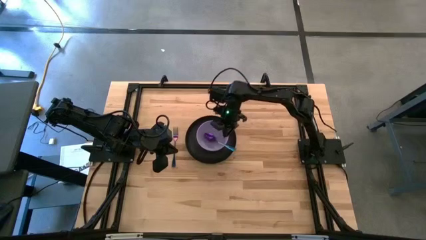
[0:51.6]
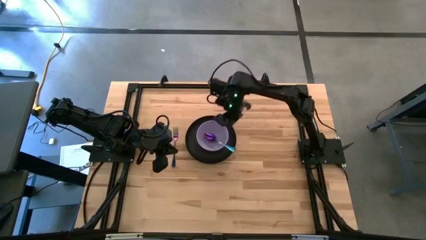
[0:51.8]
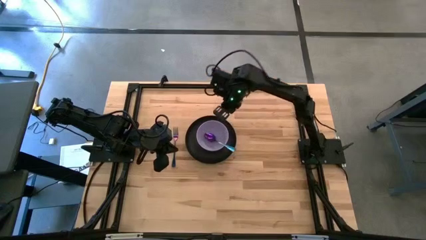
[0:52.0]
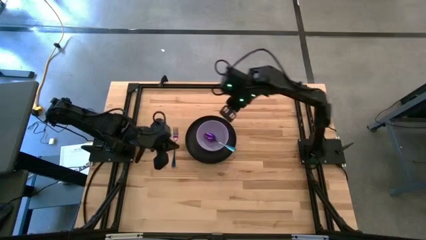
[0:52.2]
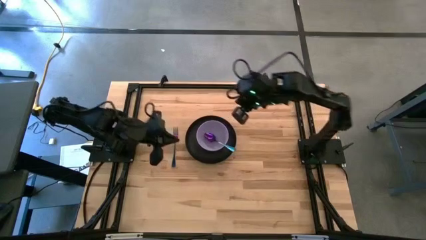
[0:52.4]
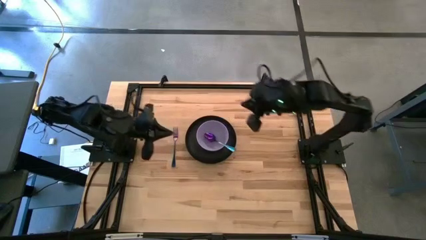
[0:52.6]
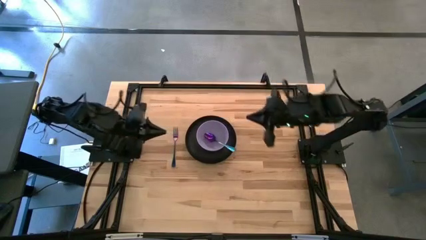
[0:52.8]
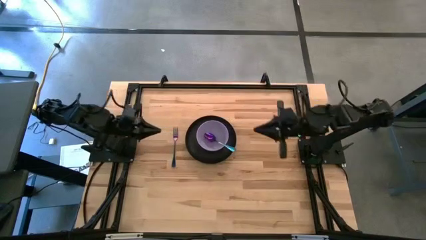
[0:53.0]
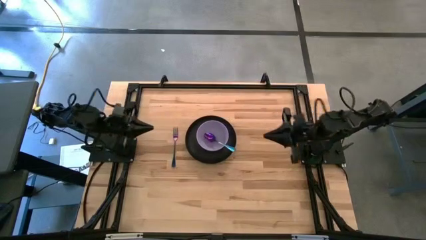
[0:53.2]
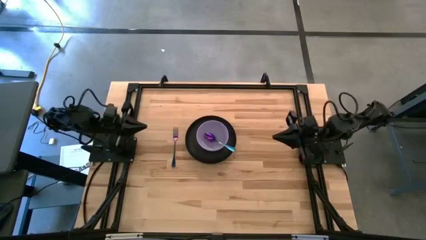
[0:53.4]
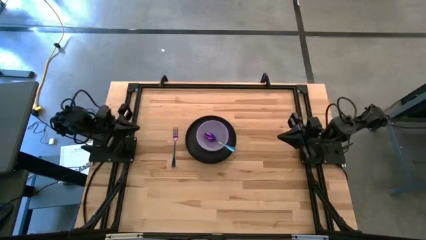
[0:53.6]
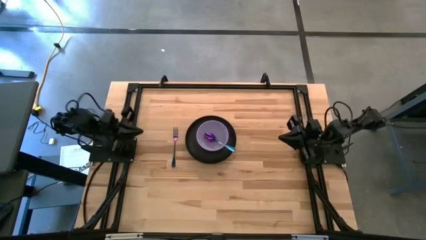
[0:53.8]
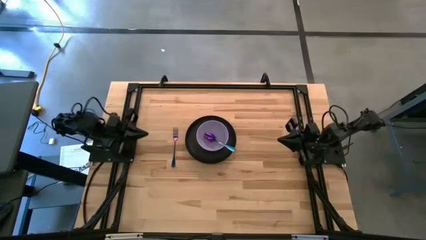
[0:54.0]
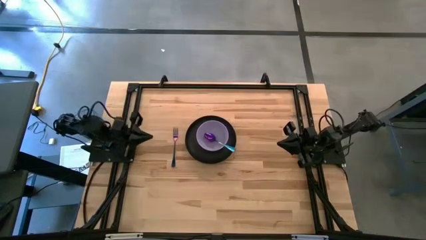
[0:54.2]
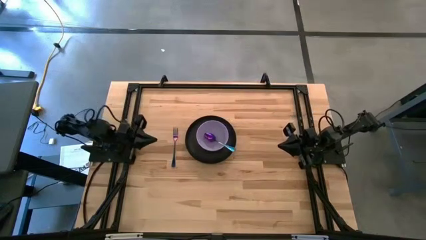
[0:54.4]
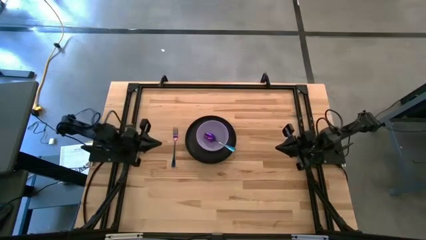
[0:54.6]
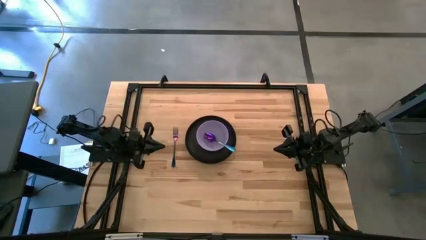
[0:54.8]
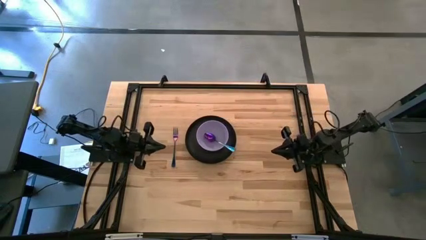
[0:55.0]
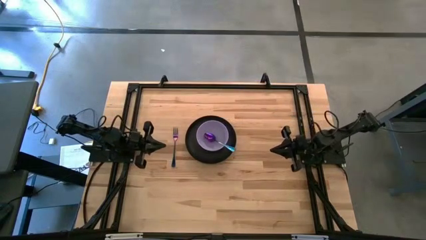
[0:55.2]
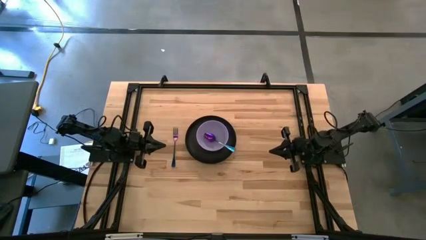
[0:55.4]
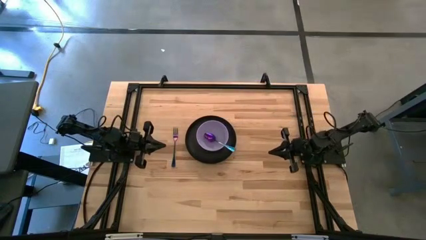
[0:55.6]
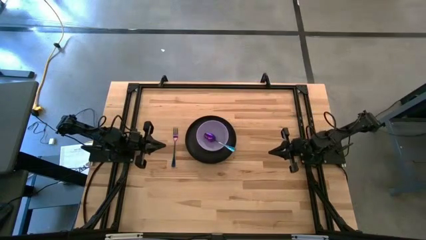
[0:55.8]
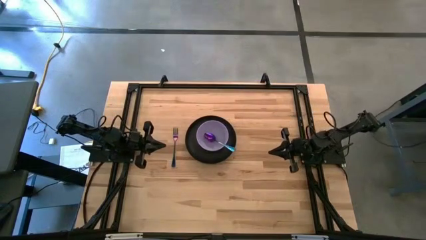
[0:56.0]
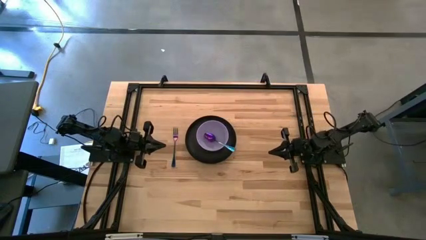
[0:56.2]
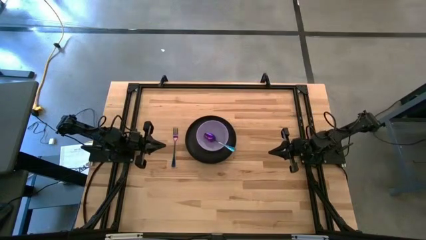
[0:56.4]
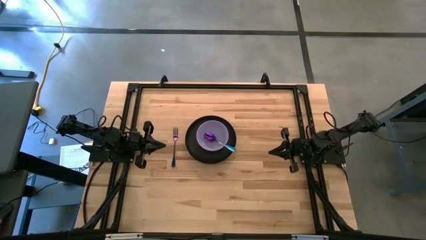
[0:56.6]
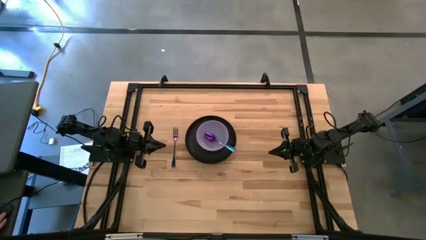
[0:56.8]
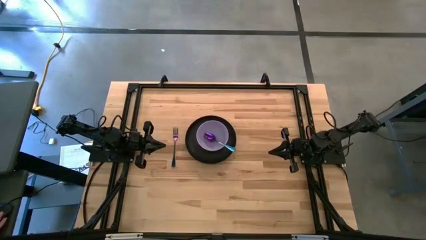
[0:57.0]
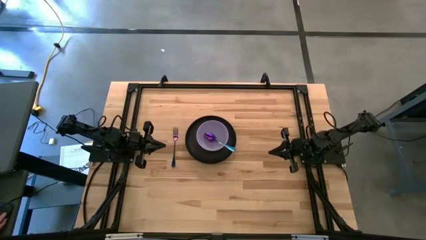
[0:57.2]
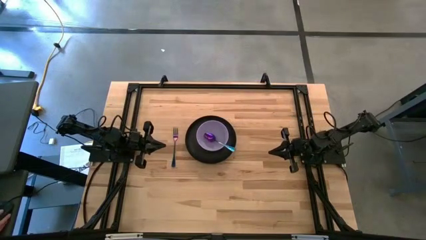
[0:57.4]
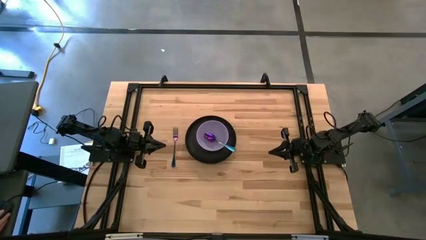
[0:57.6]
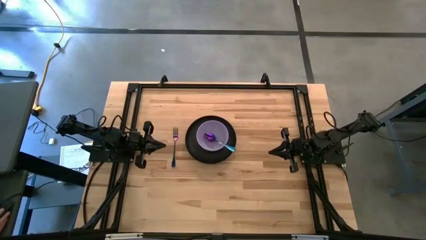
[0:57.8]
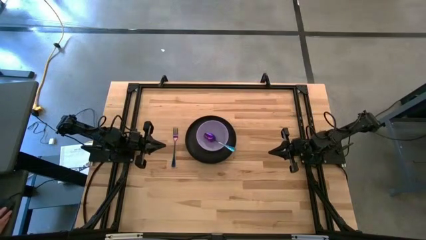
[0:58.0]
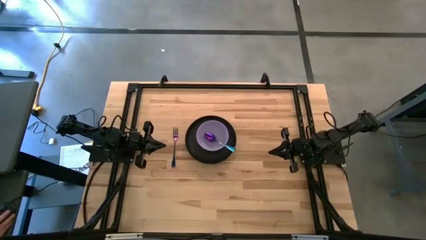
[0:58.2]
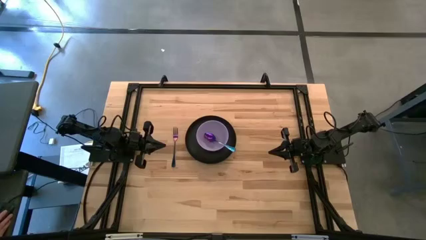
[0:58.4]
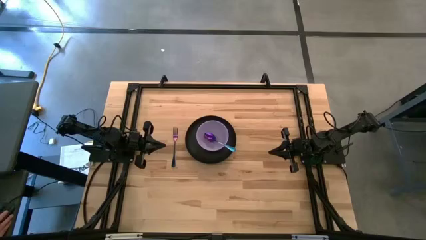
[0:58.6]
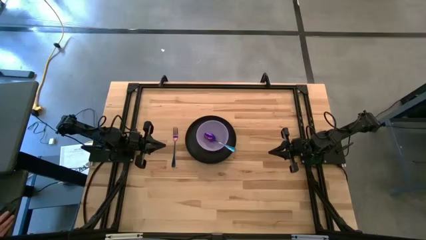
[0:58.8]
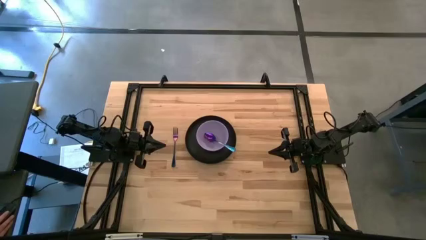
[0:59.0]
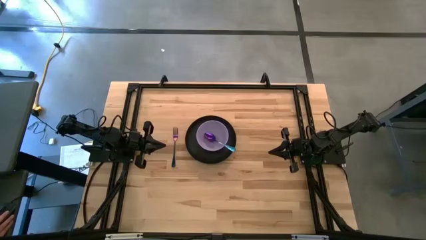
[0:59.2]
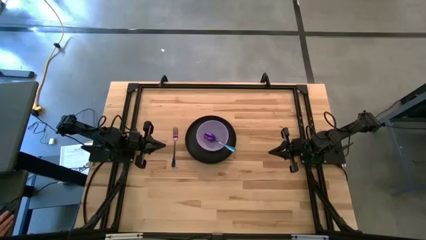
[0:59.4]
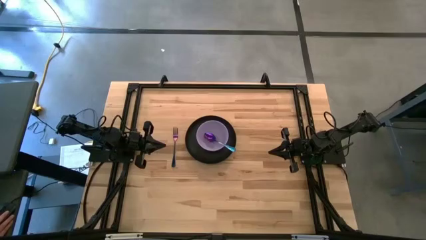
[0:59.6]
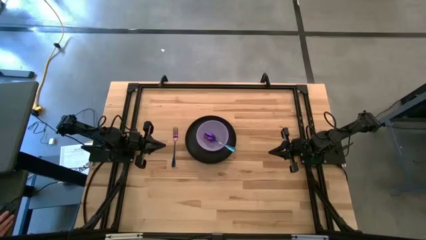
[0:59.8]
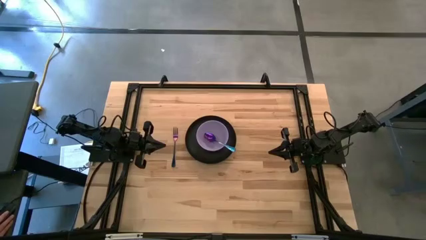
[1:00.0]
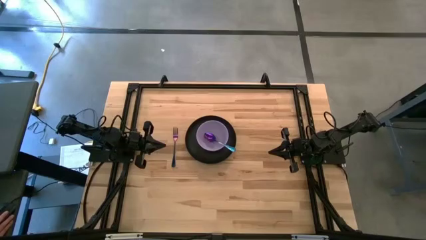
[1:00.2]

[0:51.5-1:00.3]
Task: Set table place
Return to Home Position
